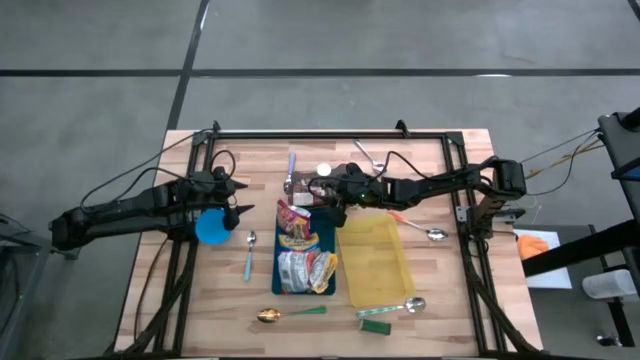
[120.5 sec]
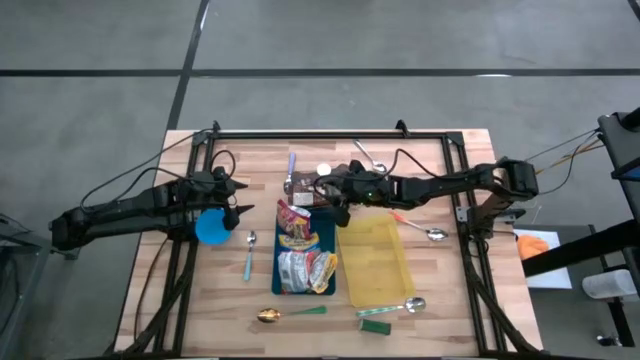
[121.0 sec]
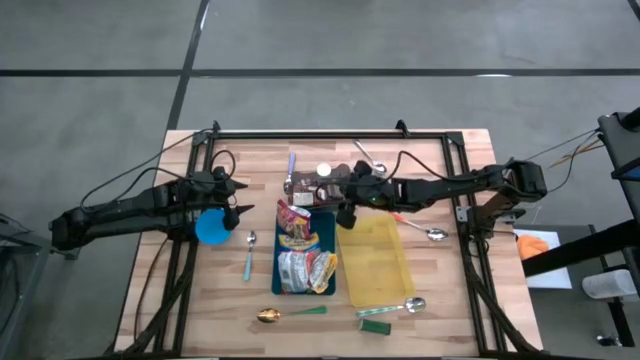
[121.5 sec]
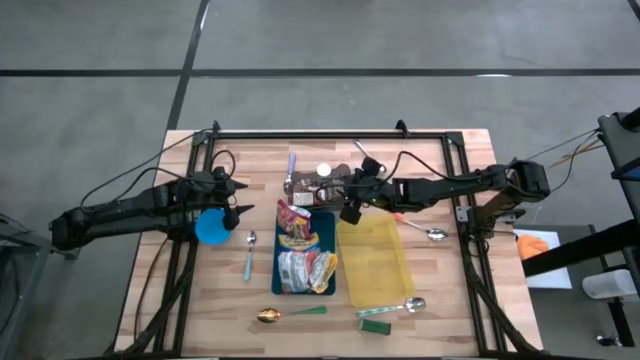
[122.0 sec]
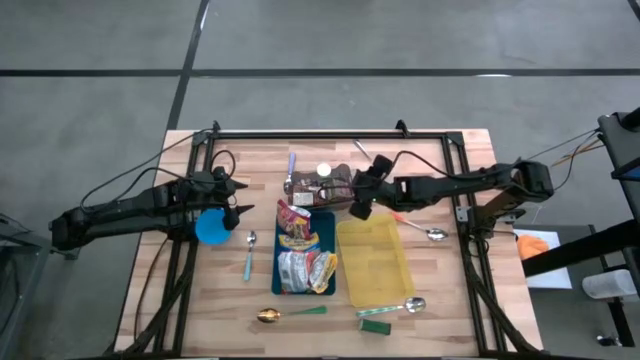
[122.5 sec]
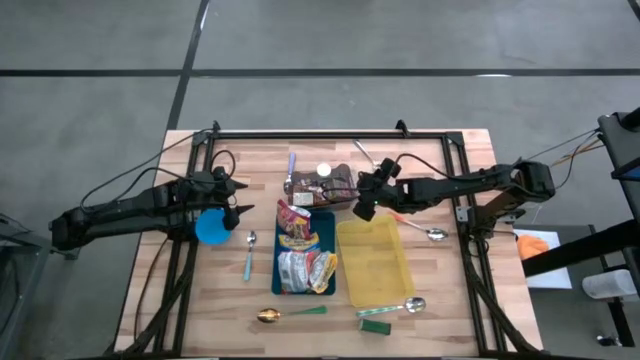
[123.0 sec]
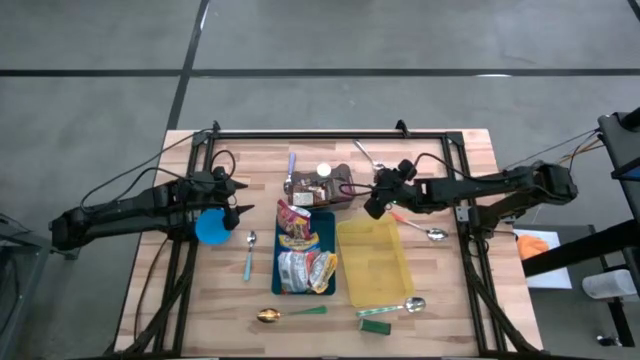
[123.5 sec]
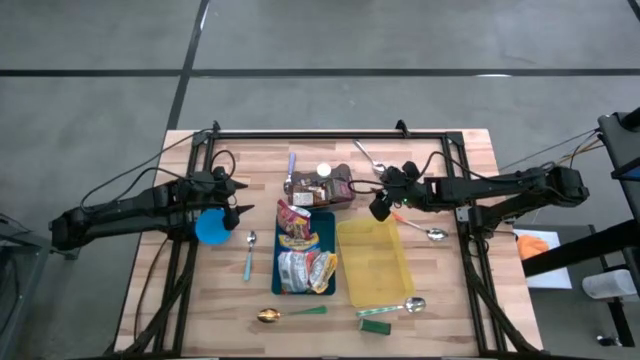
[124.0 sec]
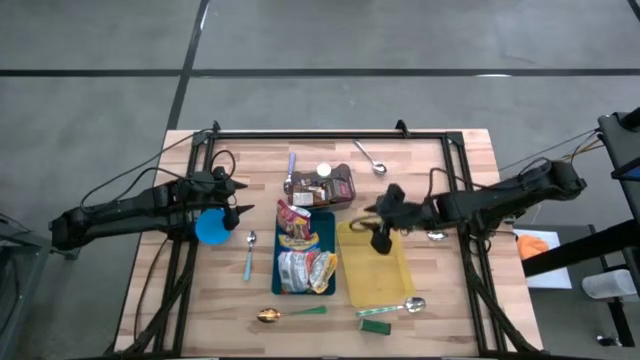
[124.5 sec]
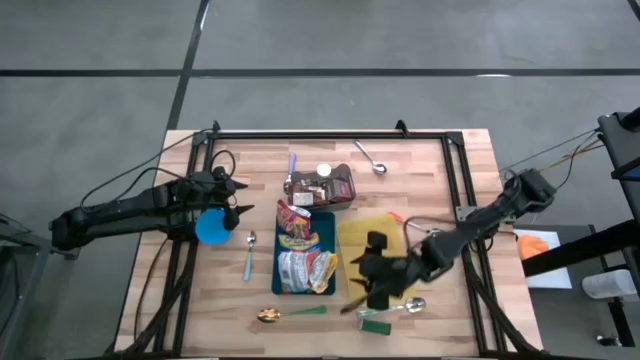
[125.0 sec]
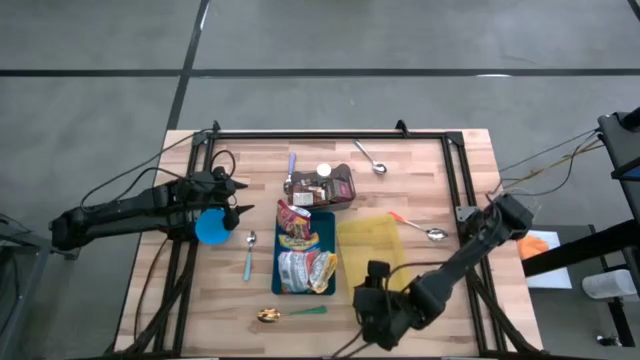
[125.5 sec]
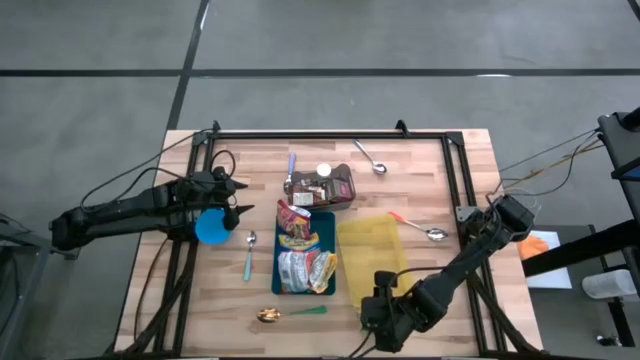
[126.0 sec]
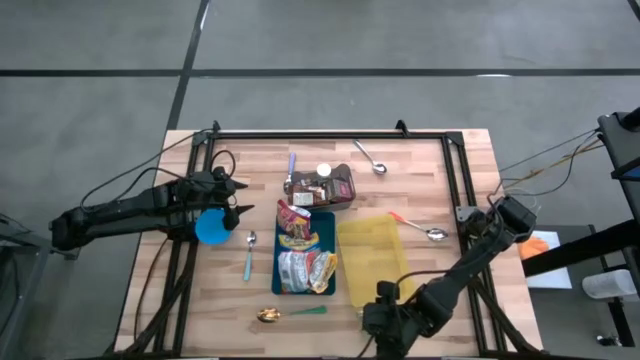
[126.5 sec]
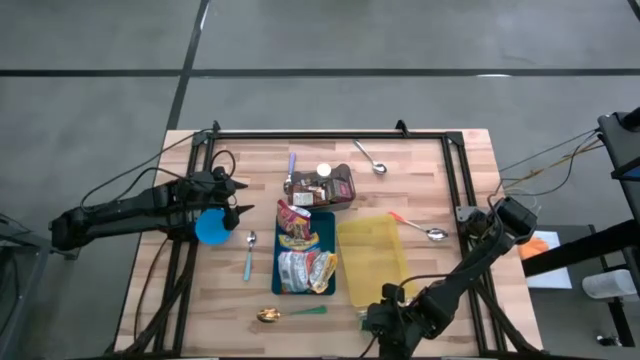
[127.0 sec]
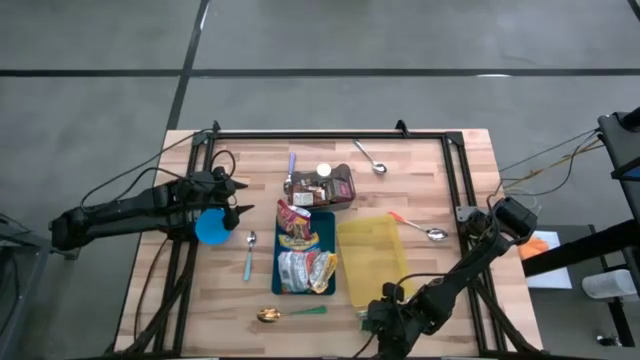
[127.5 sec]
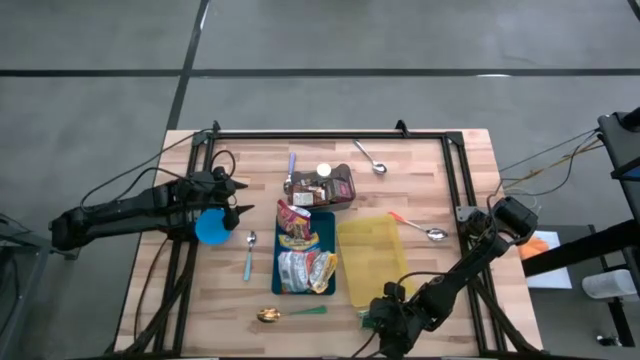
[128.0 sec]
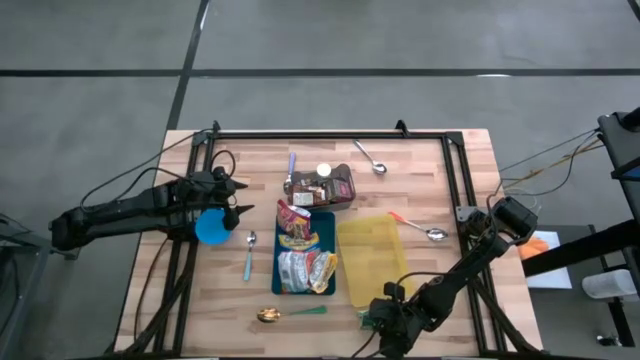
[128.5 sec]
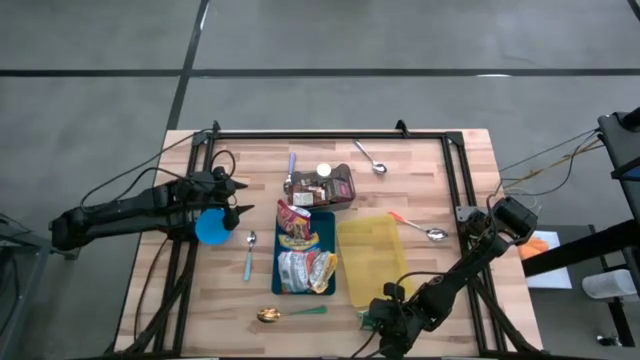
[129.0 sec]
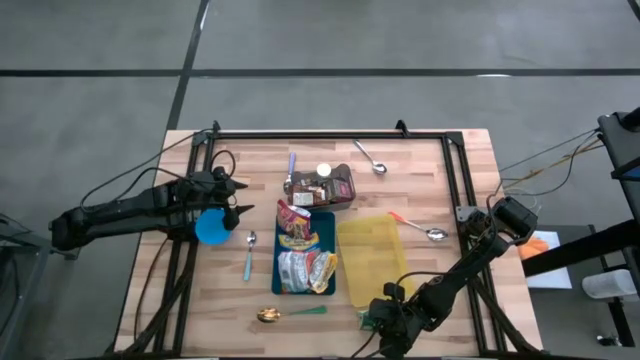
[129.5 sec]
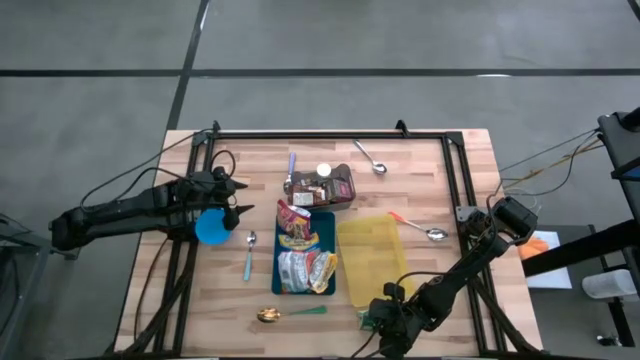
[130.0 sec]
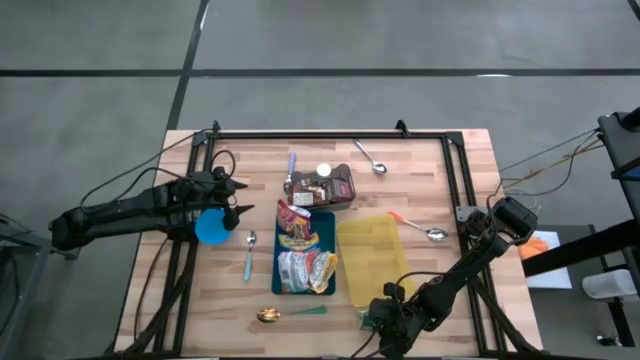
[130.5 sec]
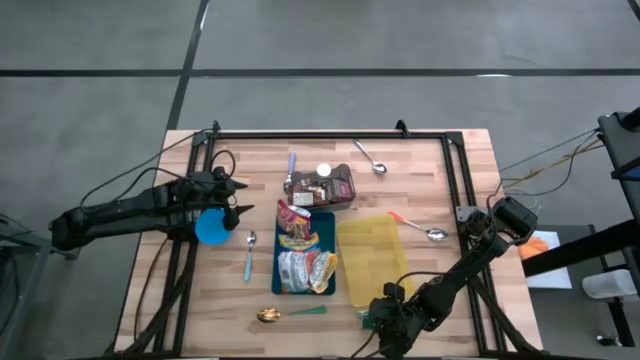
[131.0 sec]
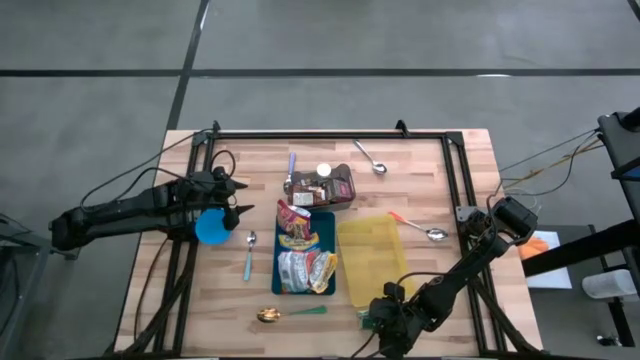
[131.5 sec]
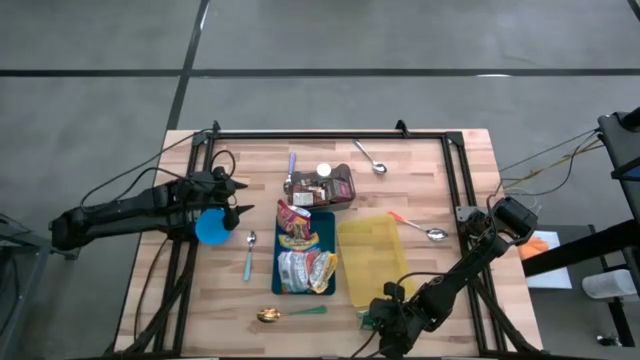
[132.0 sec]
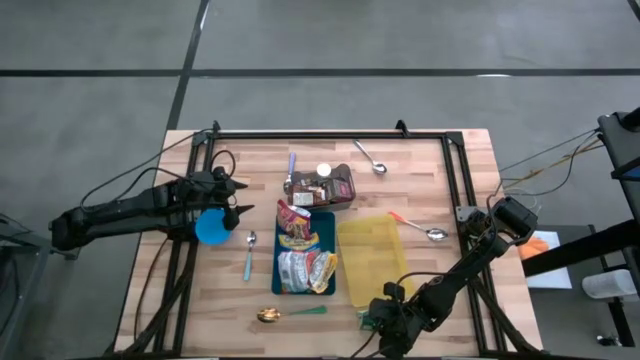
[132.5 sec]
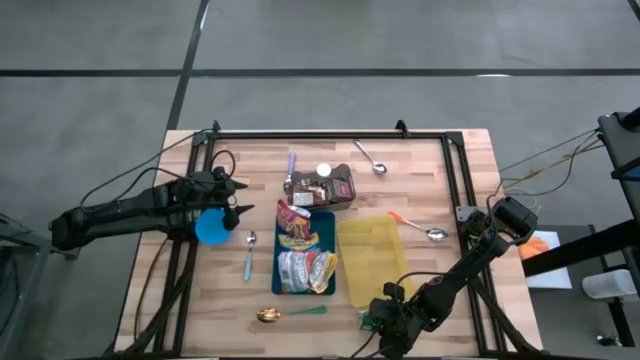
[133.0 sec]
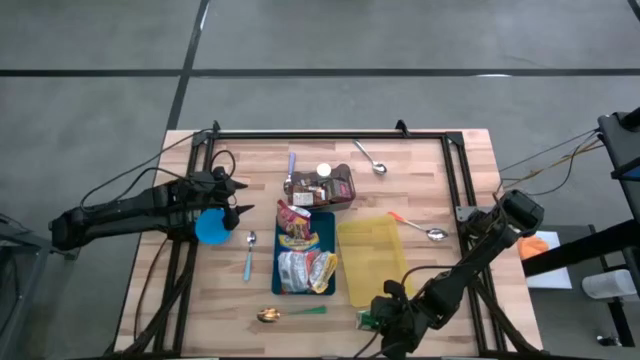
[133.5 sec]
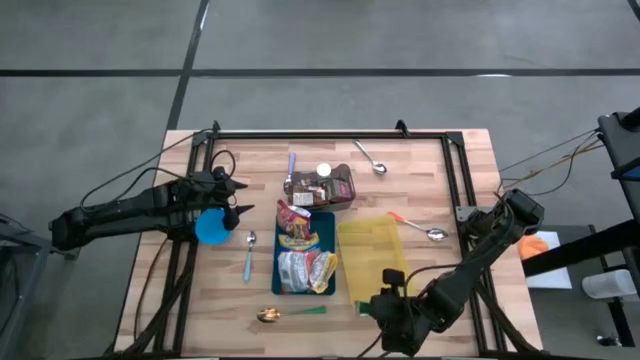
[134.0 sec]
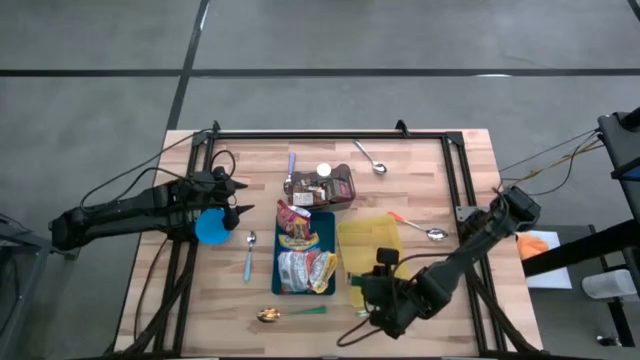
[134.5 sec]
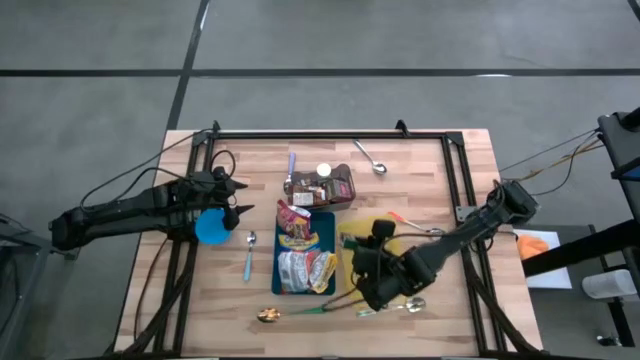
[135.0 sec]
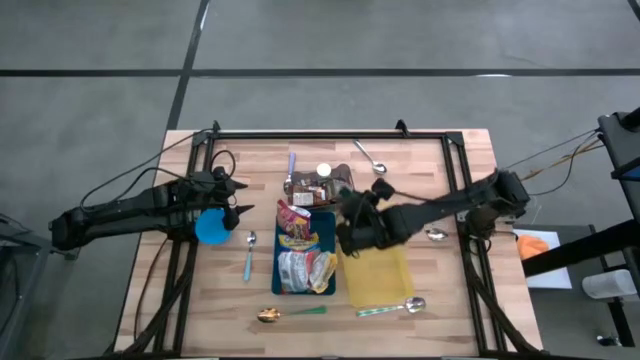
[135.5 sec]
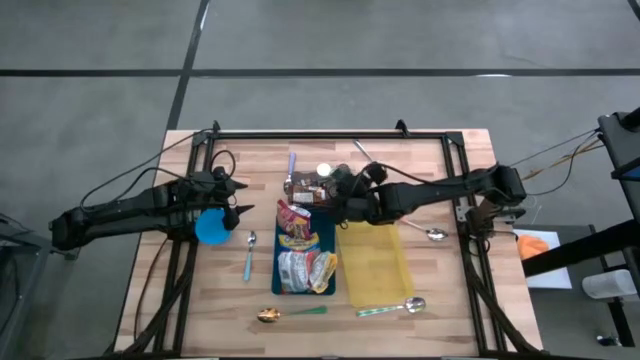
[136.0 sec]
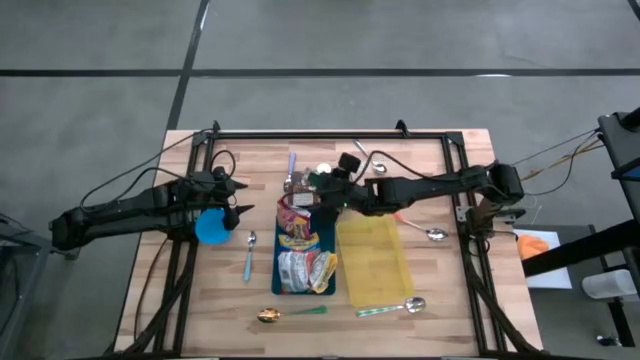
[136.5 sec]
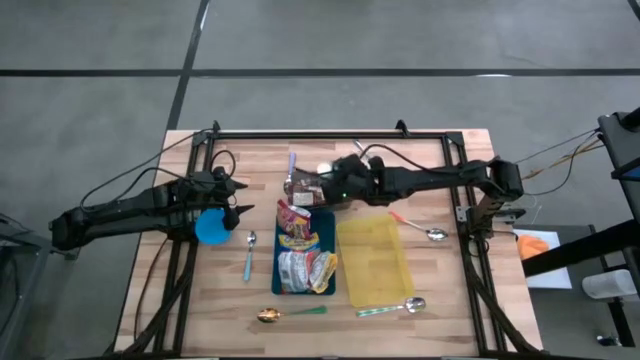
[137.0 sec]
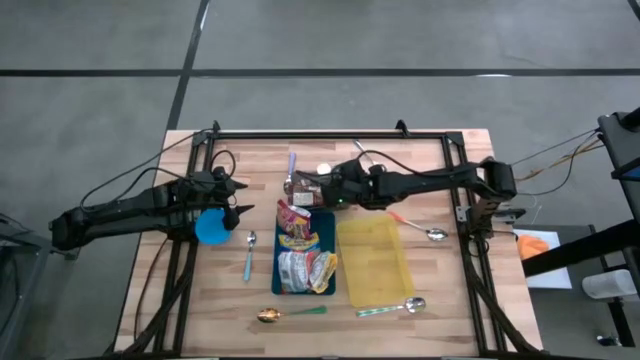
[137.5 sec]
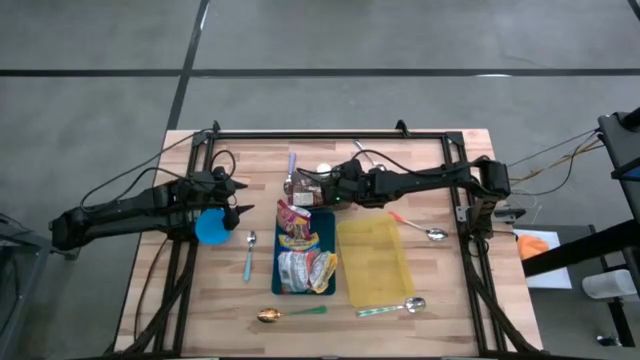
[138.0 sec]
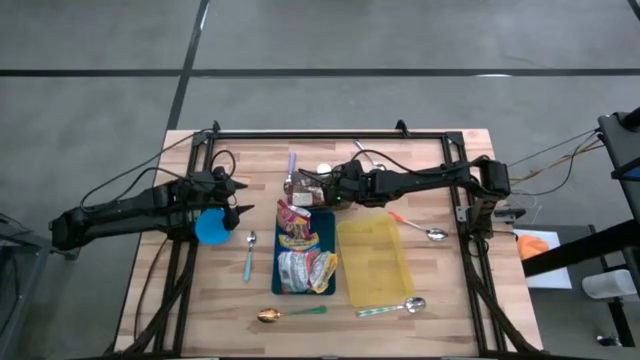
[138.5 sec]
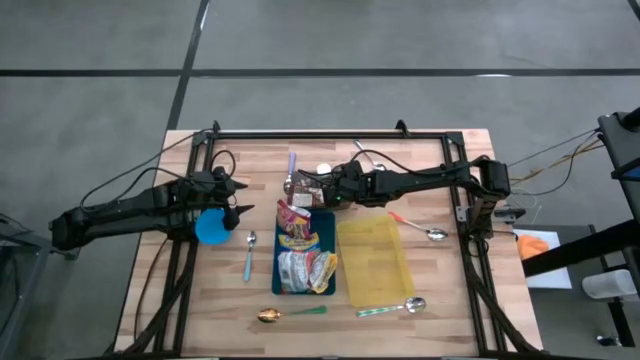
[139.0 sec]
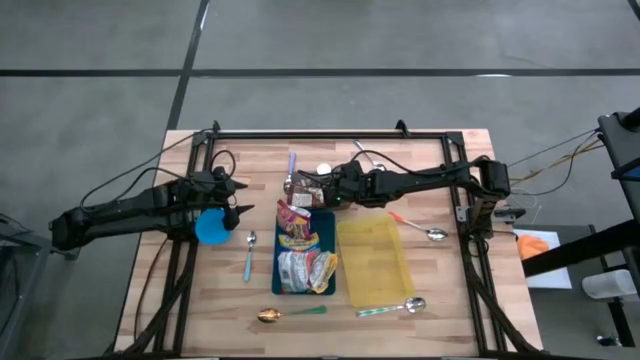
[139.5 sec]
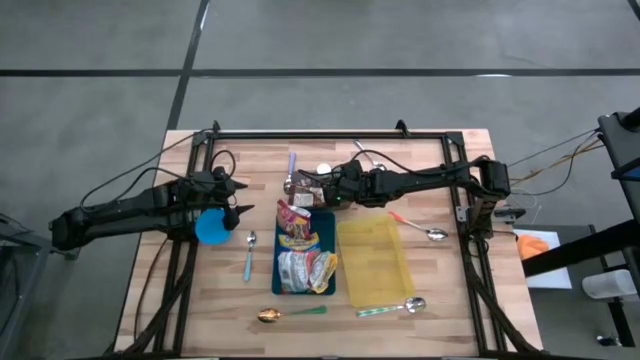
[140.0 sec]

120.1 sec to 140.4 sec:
Put the black spice can into the black bin
